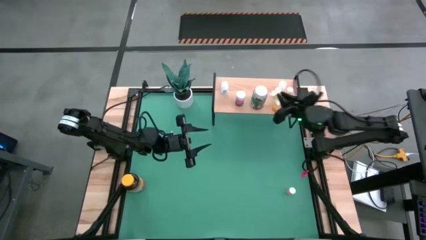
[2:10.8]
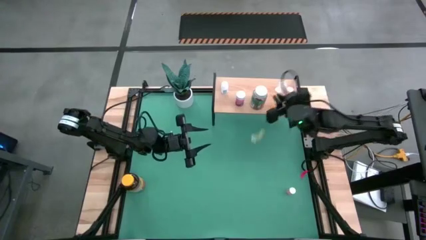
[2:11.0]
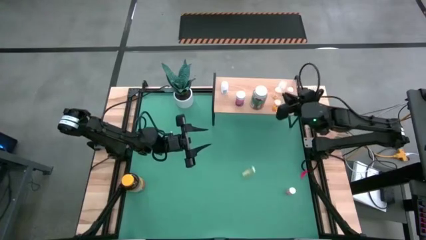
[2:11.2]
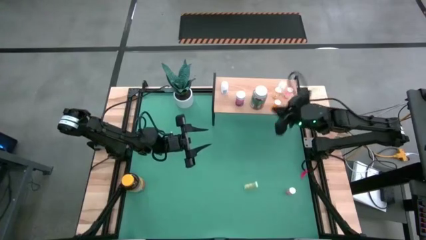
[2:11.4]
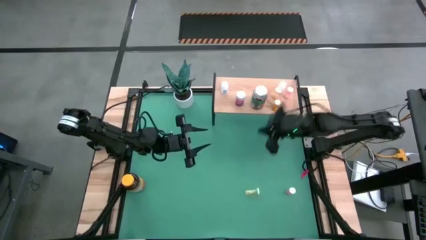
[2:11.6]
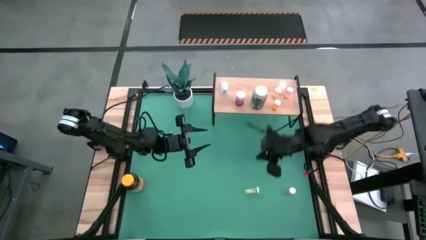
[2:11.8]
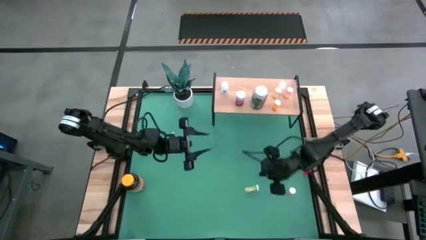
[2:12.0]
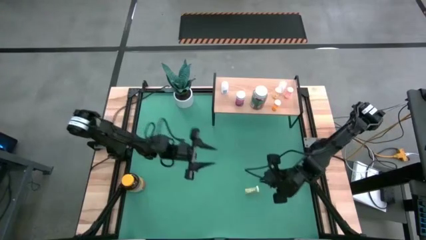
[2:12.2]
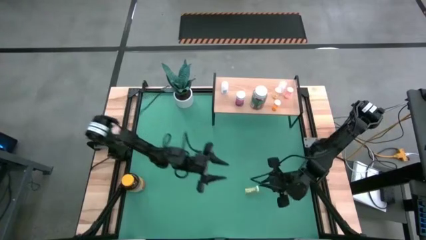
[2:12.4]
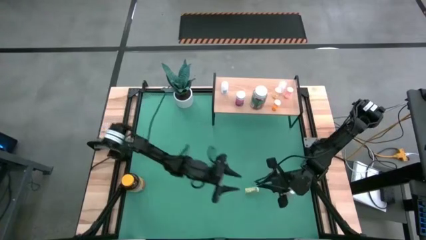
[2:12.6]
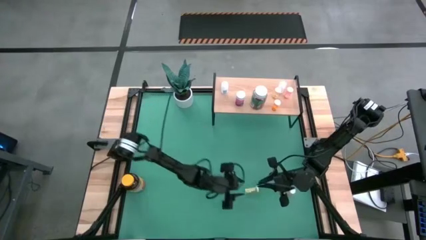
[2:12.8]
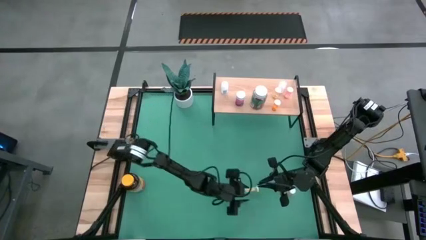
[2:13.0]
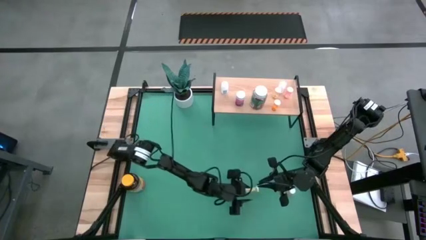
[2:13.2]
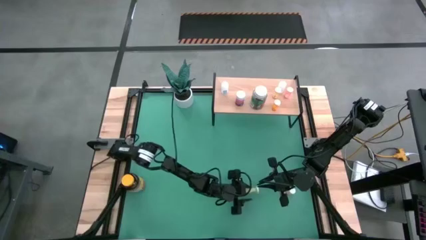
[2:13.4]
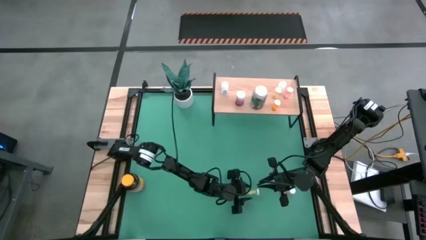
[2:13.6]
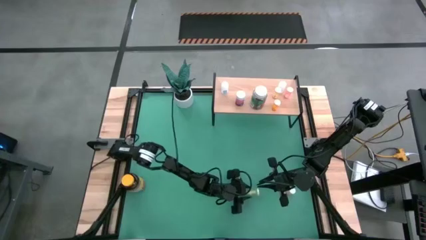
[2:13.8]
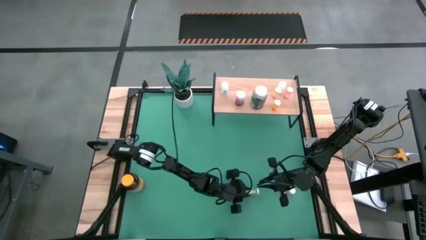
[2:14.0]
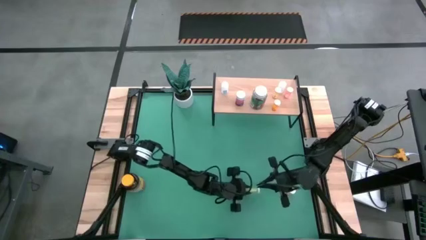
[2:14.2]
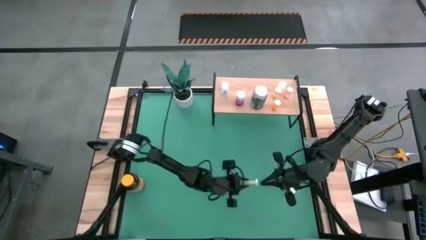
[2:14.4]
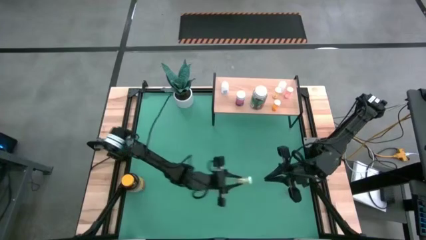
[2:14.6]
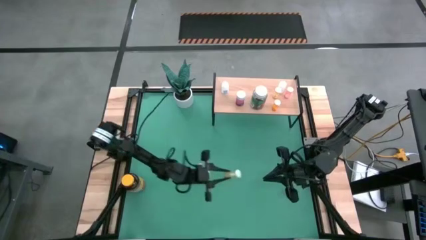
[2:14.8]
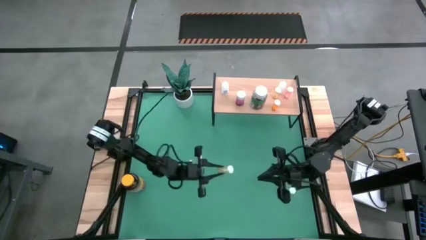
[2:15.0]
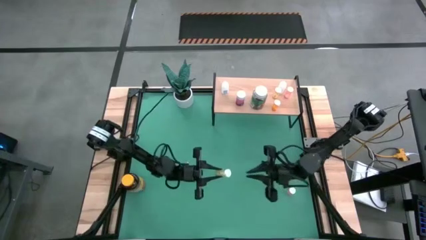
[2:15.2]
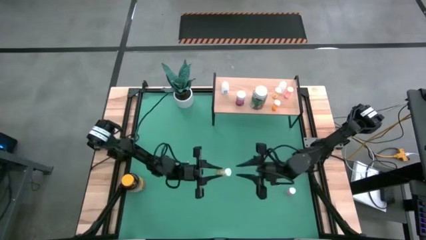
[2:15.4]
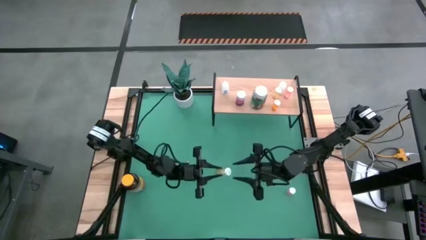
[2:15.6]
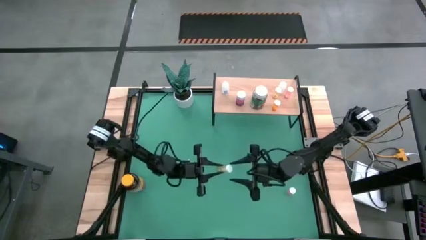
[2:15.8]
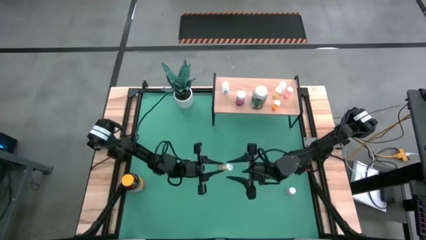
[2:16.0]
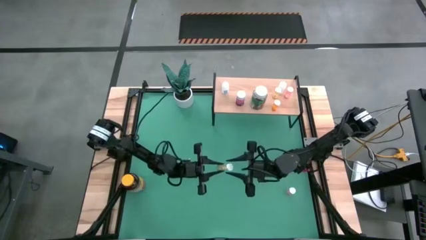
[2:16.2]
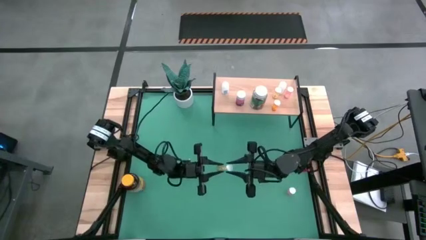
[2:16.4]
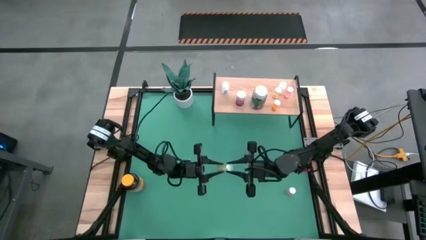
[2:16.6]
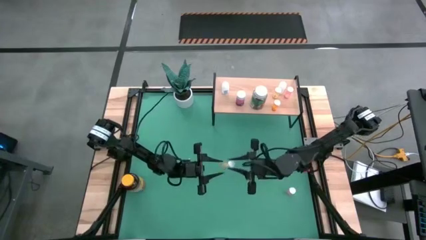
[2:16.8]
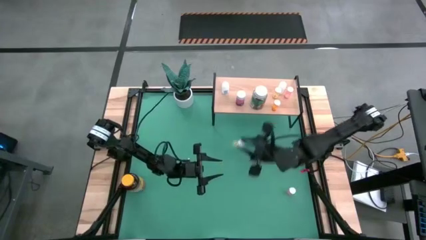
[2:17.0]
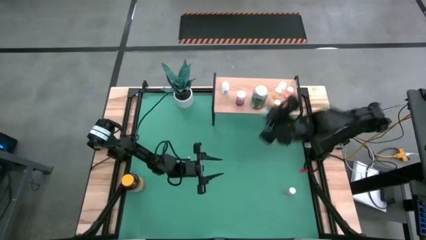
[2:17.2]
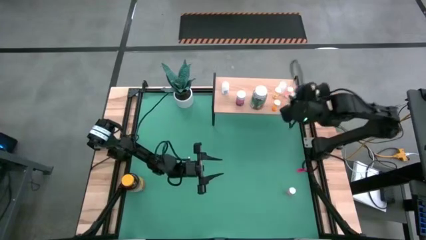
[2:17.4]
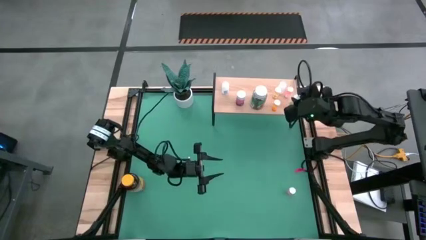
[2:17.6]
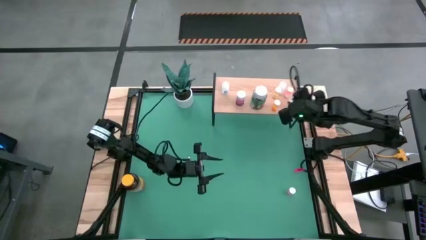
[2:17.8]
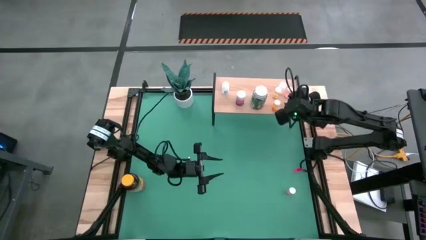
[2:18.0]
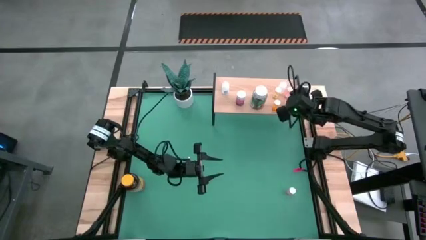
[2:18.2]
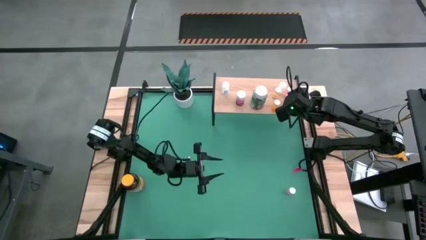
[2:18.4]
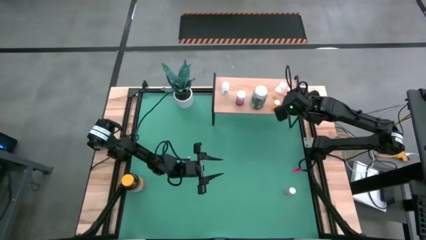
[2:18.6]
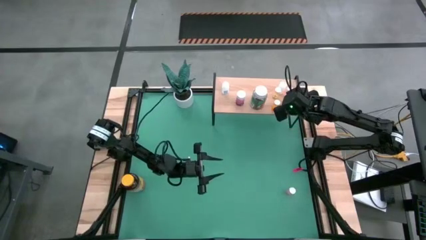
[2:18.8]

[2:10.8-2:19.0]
Task: Pick and place medicine bottles onto shelf by color
Put the light yellow pill bottle on the shelf

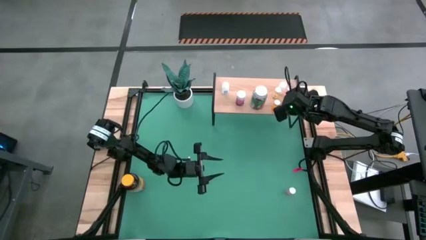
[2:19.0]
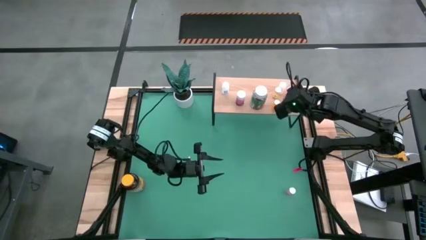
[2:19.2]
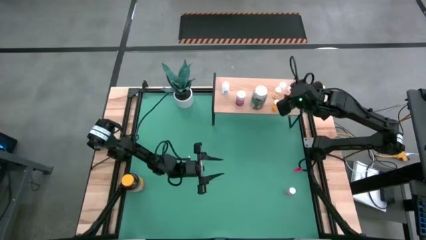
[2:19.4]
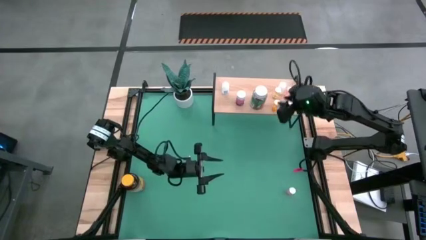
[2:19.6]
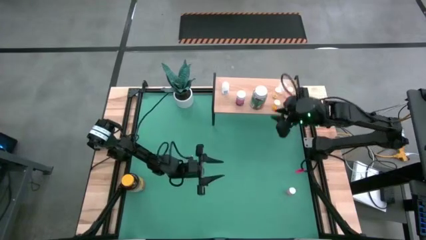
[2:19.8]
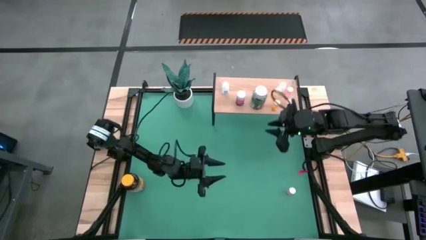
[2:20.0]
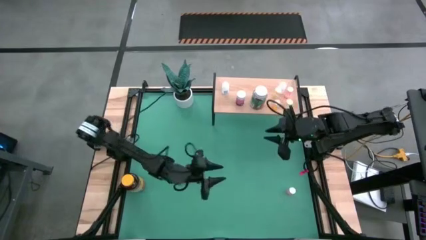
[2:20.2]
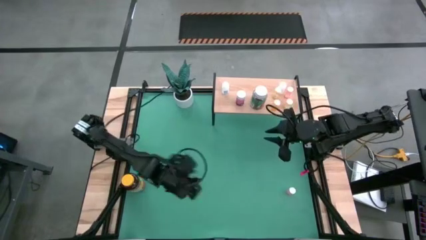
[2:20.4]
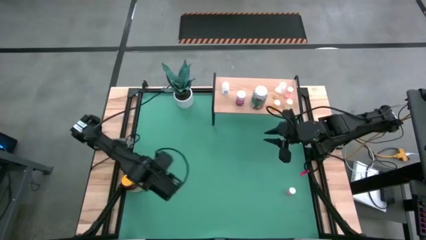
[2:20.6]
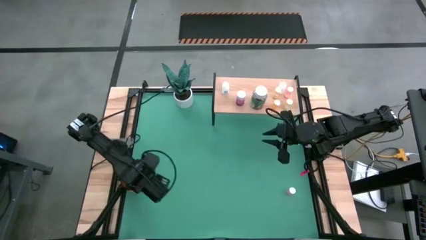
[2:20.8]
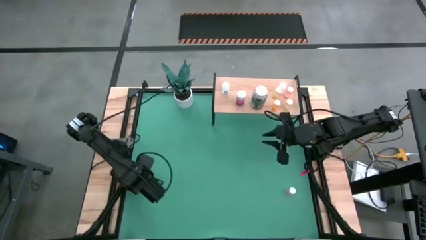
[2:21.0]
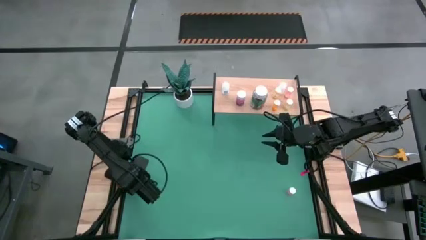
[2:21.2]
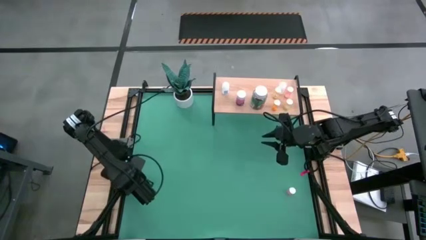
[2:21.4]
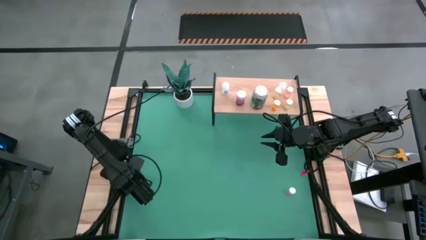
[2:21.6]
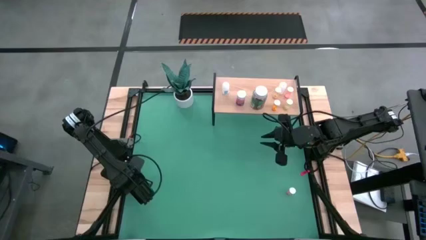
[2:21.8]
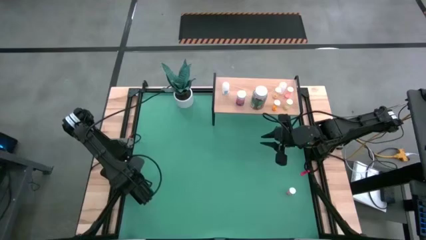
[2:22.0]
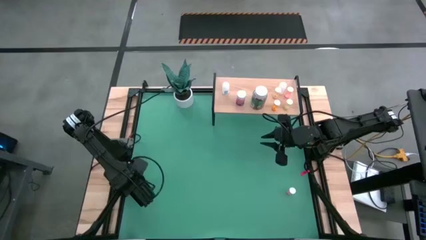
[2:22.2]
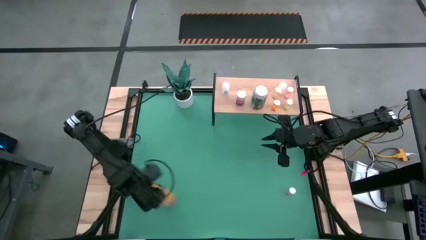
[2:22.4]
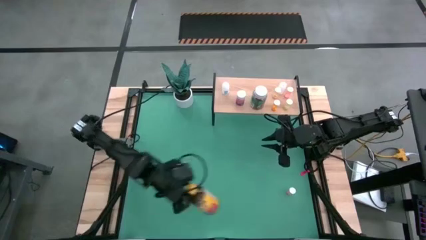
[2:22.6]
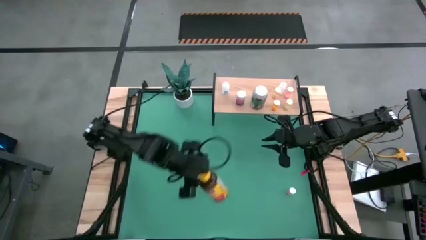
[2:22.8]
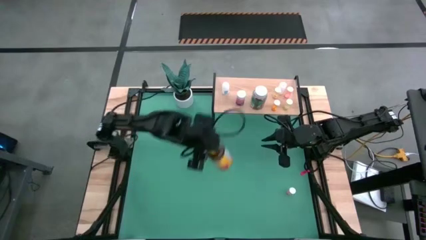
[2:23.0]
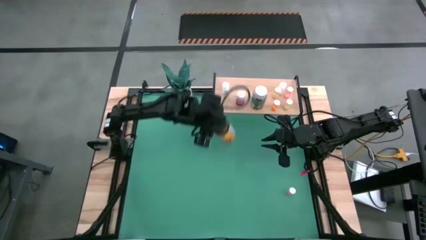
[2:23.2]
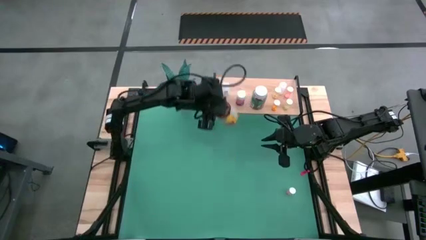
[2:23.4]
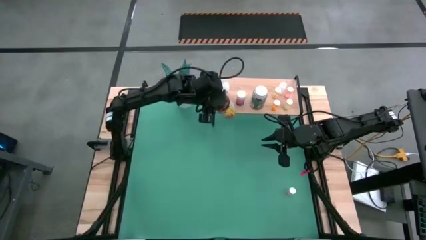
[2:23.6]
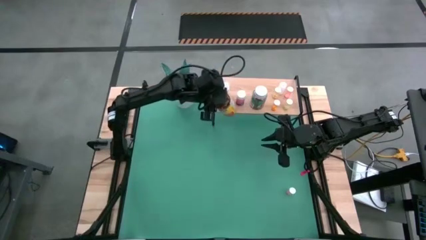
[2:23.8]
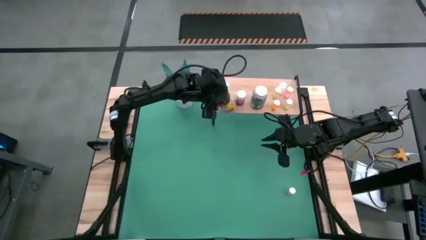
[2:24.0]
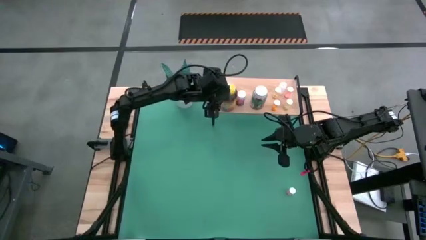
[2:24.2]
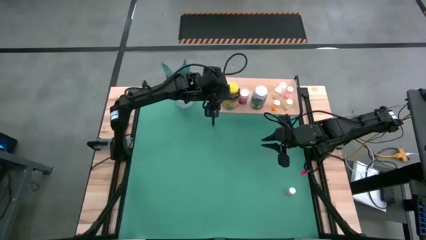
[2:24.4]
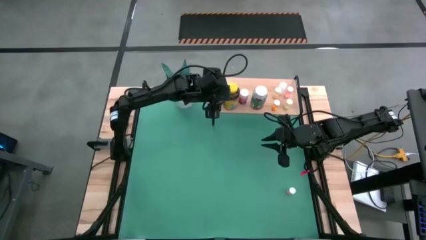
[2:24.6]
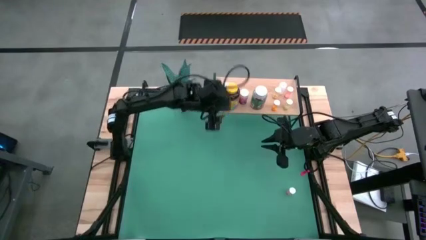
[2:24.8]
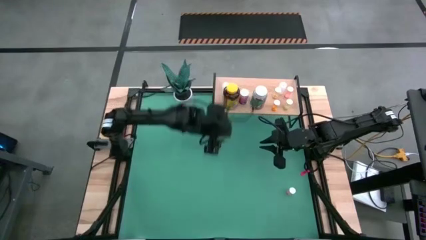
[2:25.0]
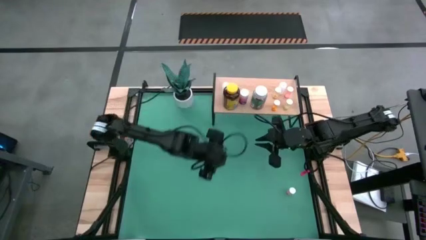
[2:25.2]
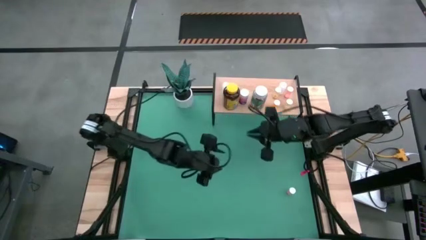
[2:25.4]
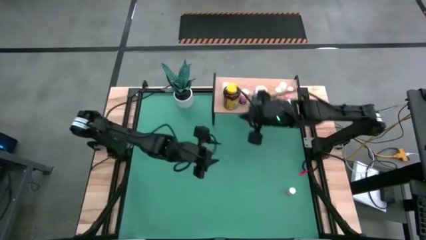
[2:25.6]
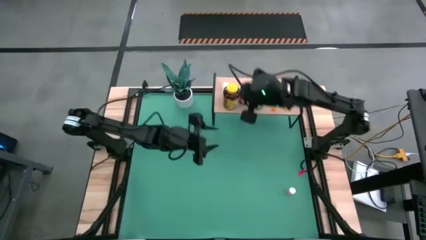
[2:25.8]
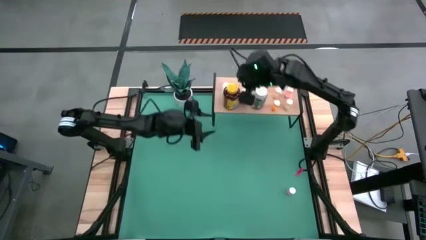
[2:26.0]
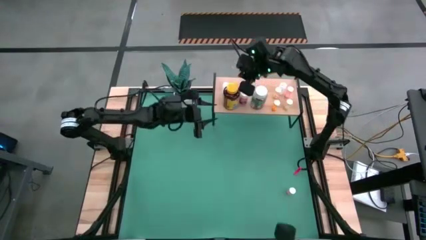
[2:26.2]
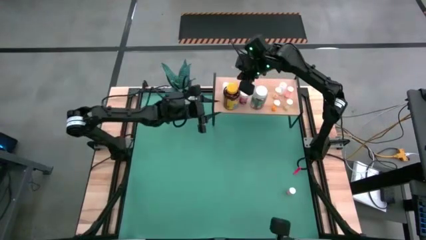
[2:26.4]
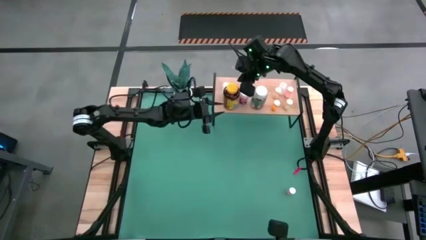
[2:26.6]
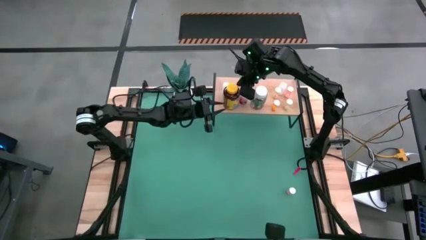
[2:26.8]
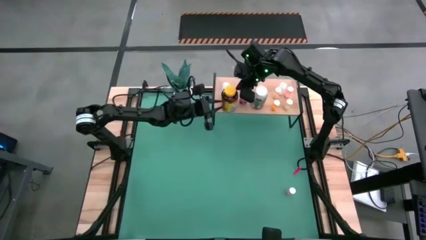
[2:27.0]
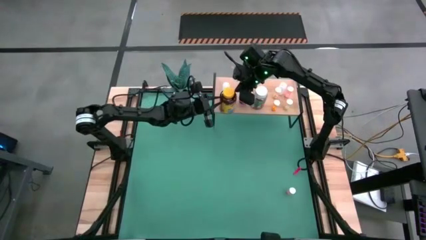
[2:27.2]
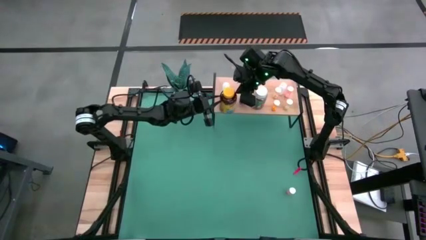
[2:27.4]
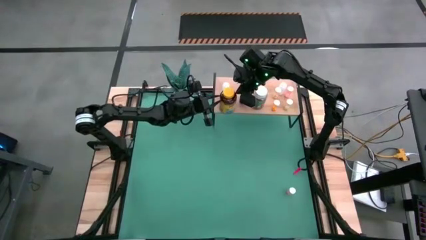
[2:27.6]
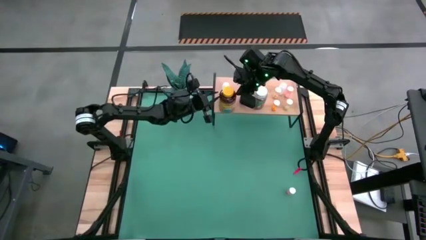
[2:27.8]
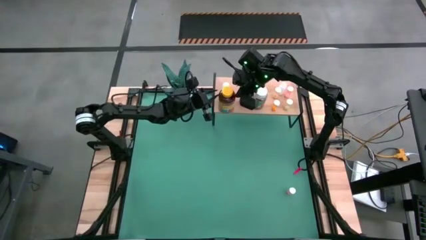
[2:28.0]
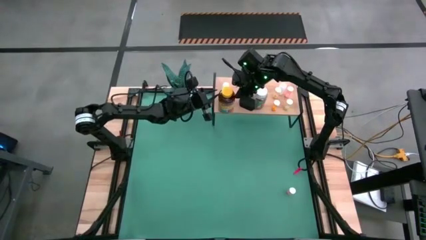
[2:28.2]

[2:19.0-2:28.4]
Put the yellow pill bottle on the shelf
